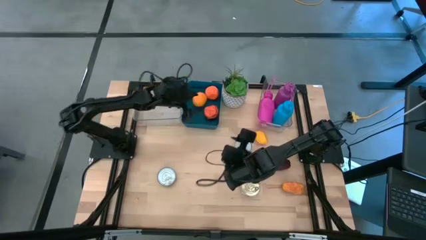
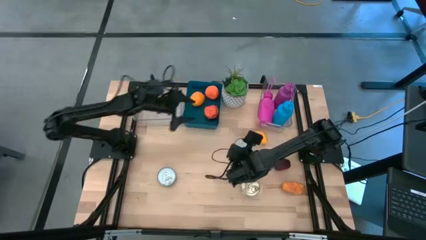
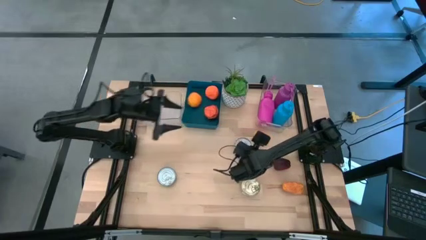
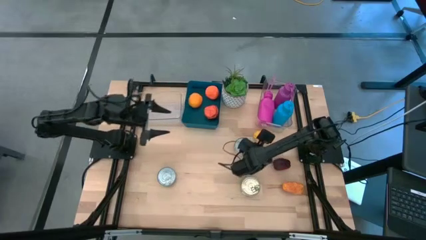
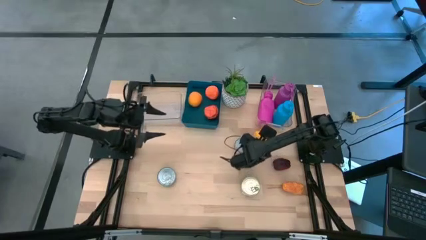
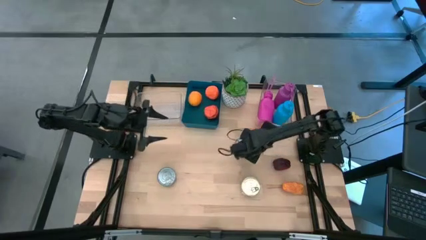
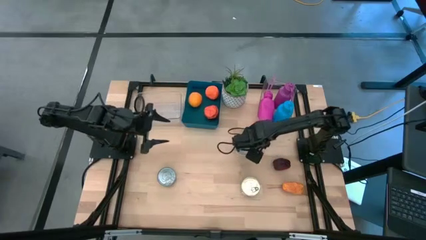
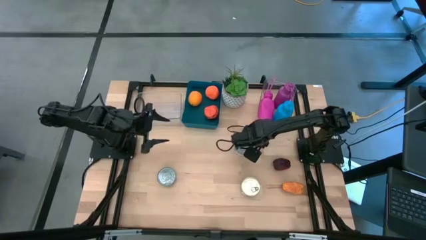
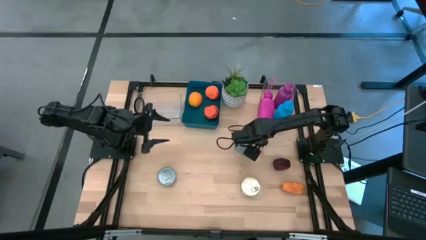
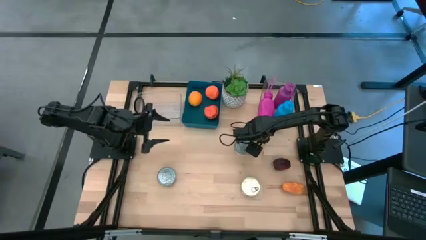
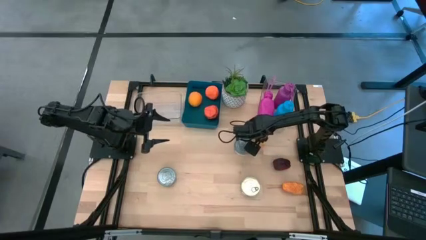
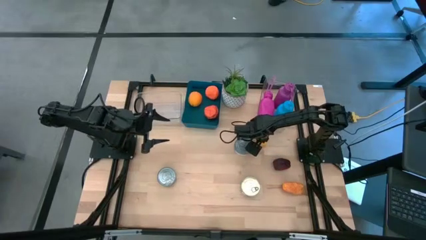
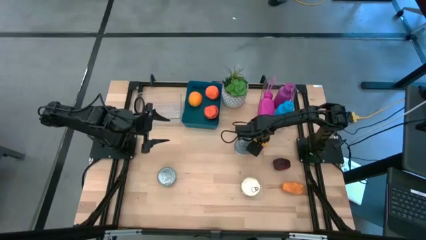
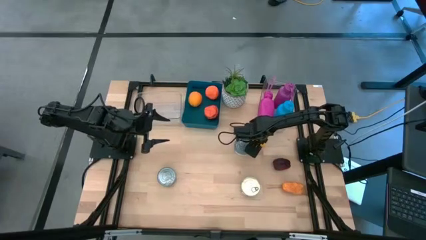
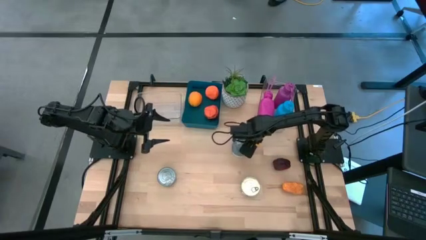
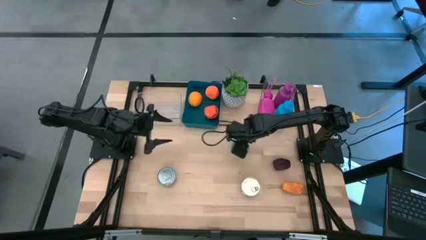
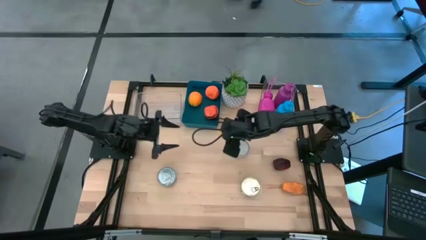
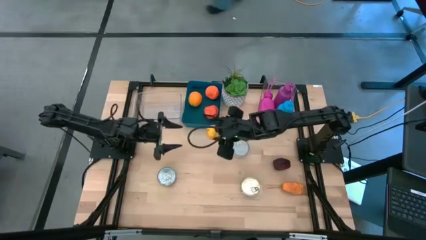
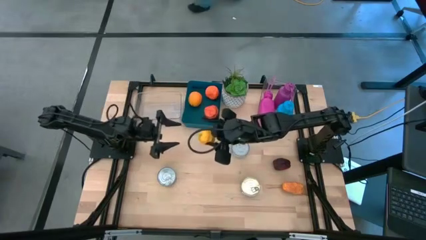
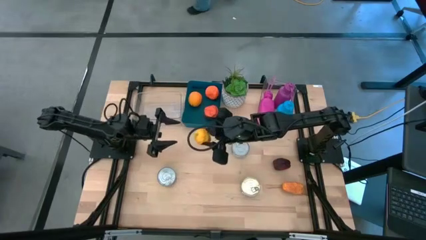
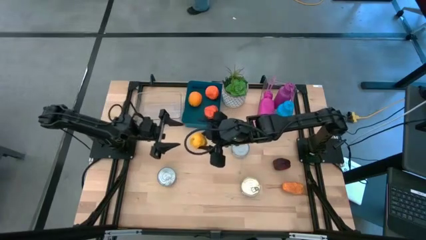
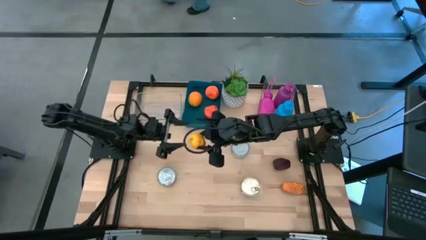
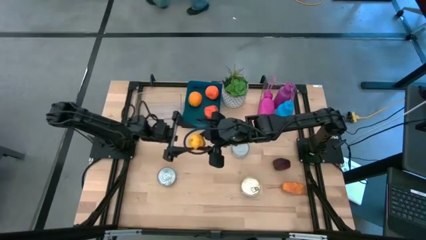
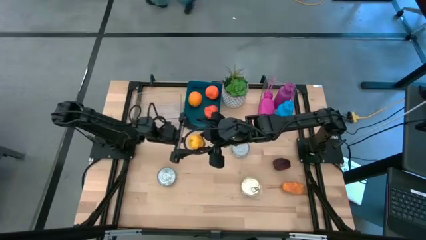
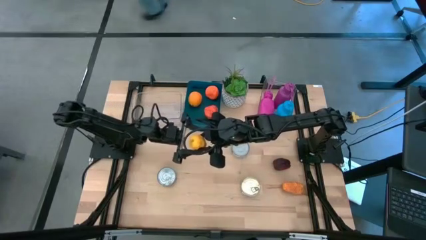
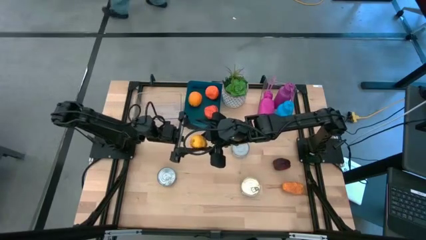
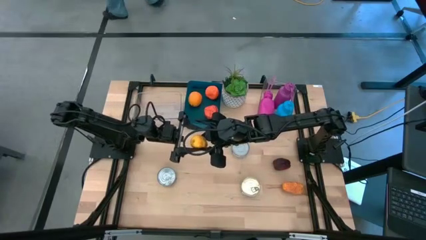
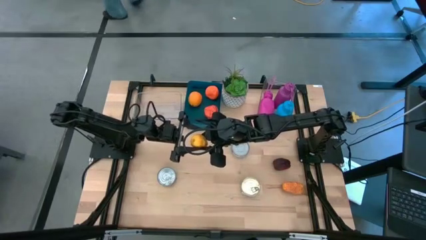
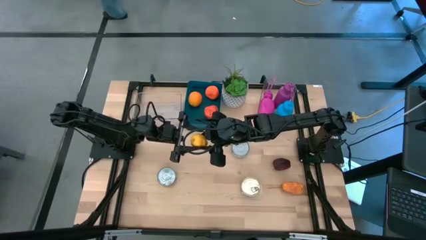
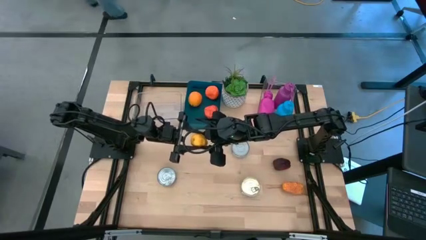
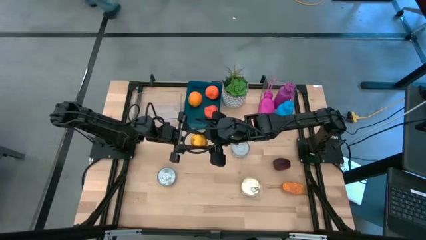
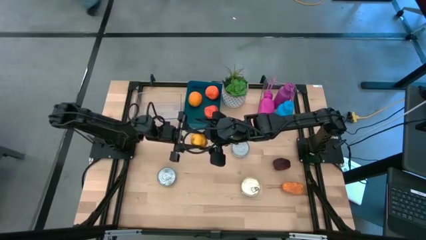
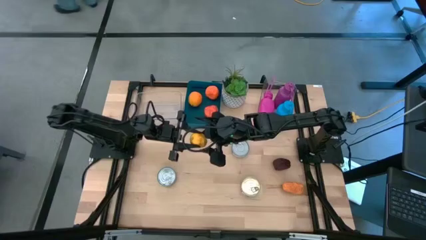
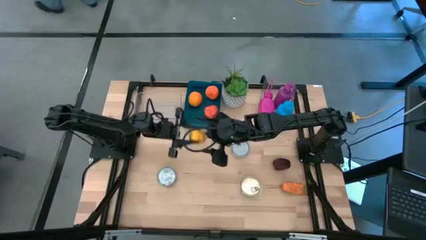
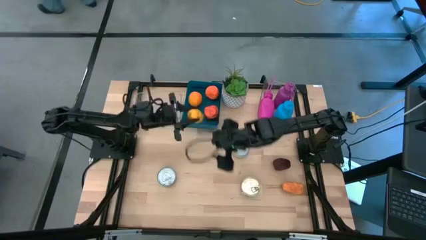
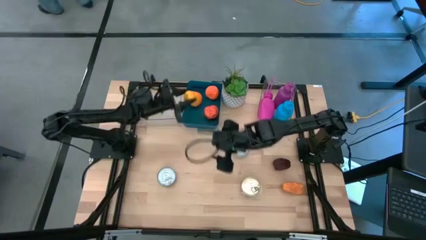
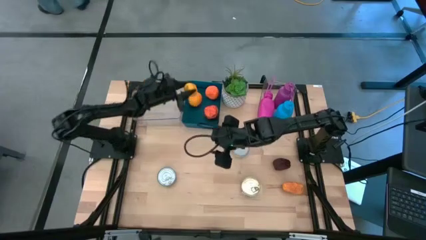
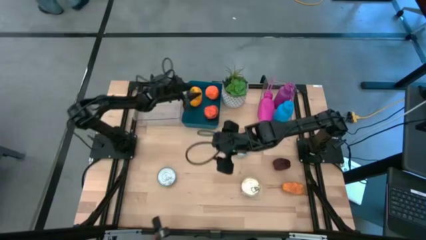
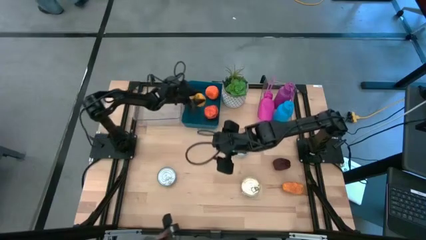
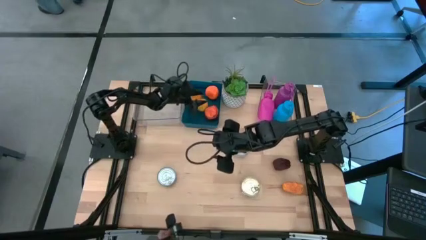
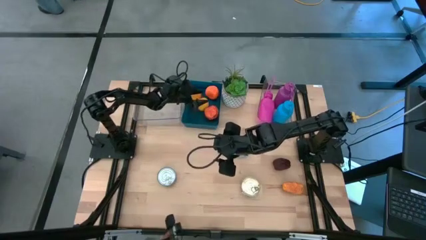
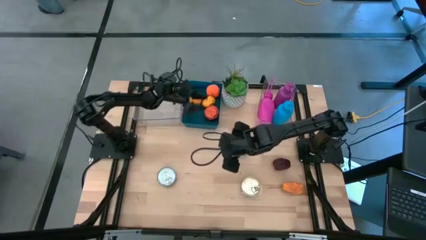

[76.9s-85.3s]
Task: Pick & Place Food Item
Put the lemon into the blue bin

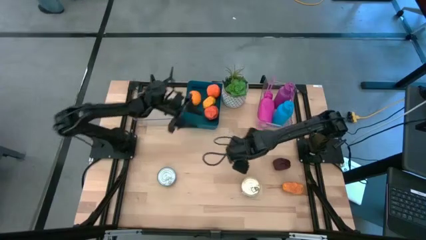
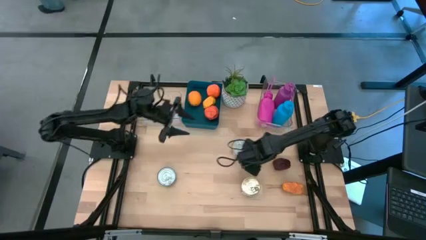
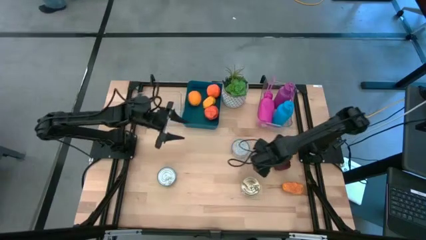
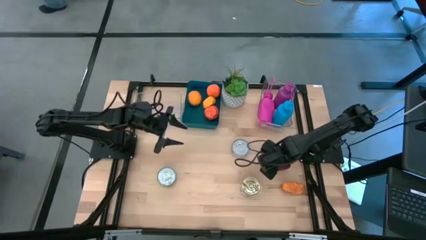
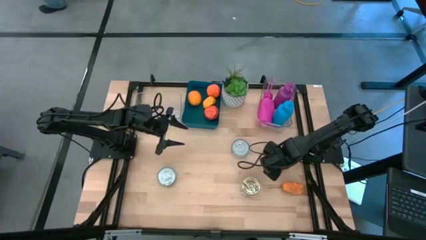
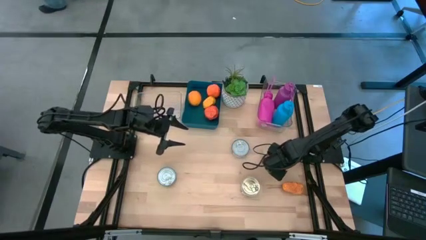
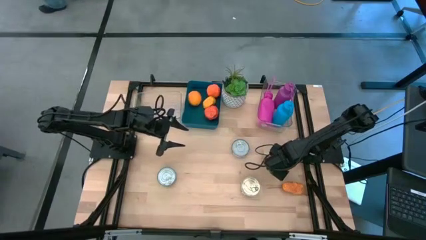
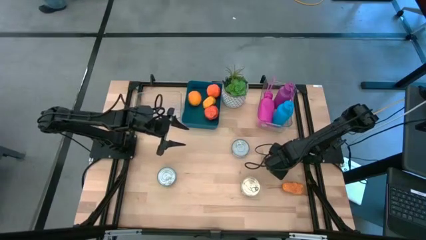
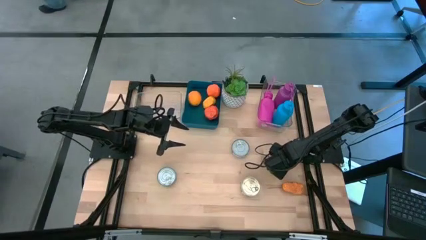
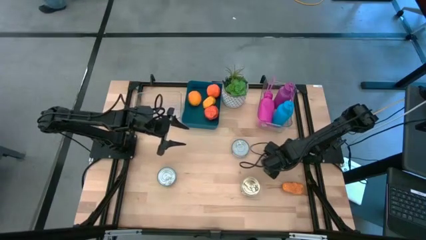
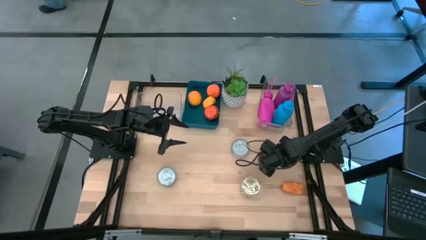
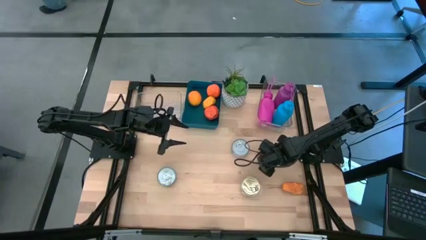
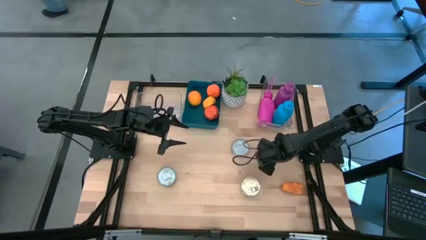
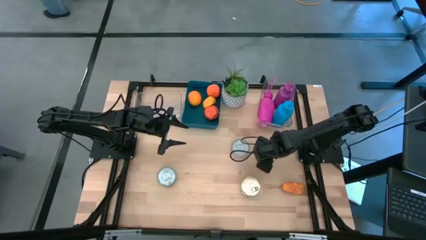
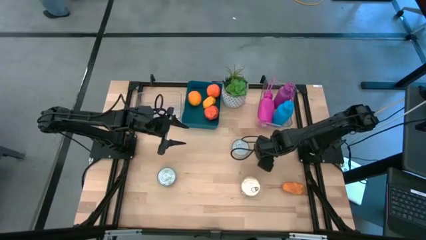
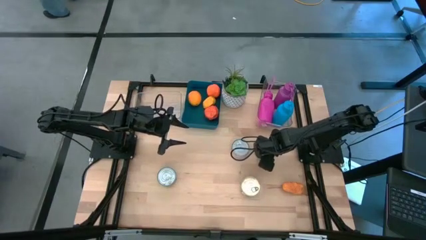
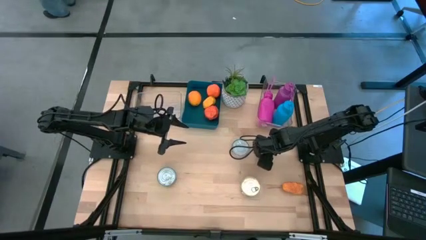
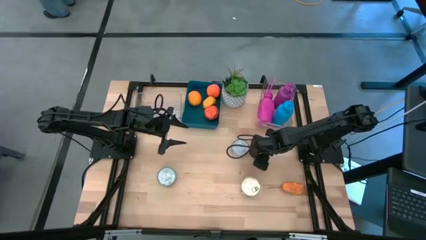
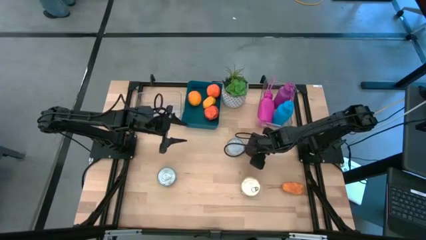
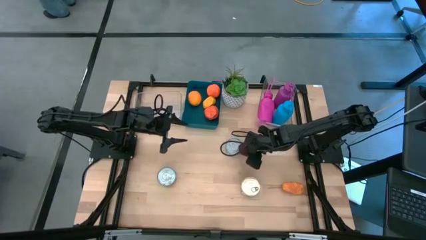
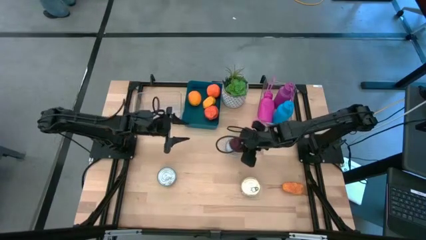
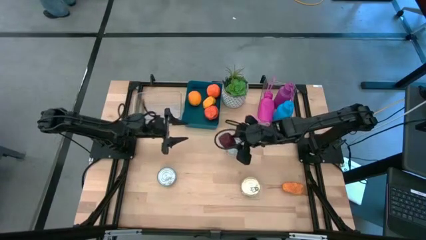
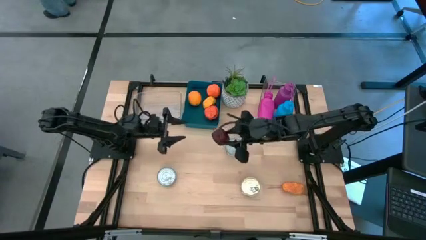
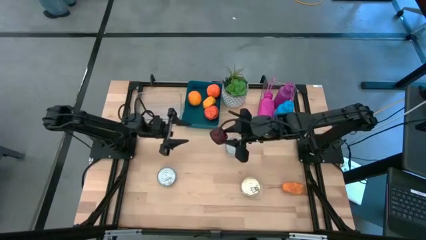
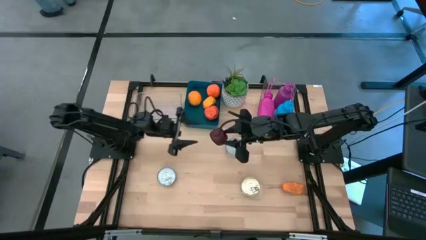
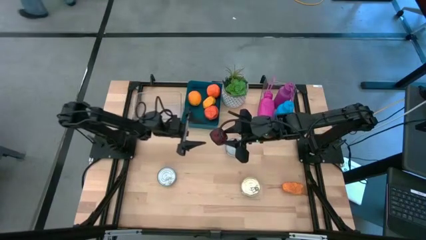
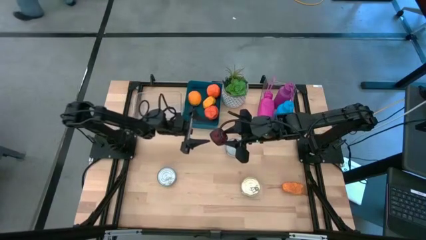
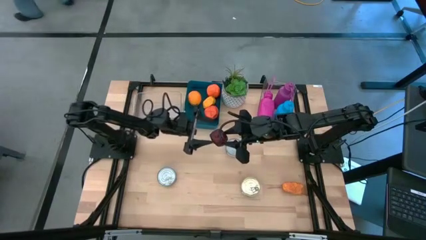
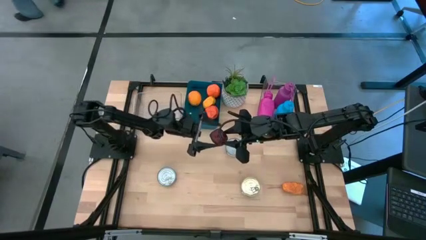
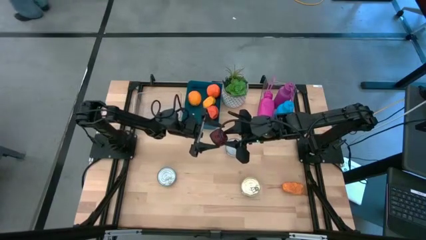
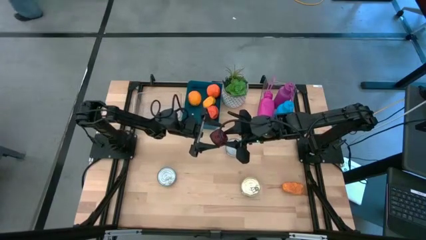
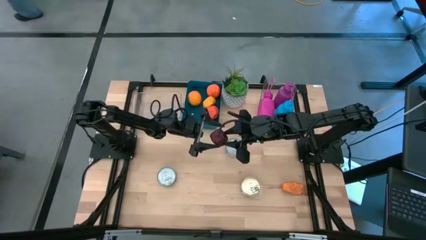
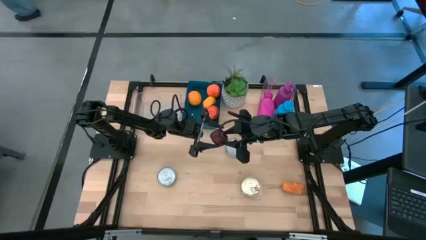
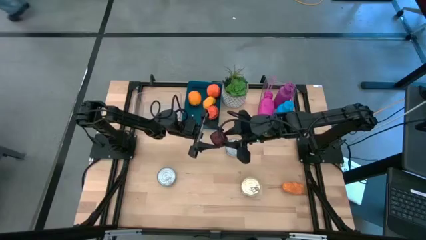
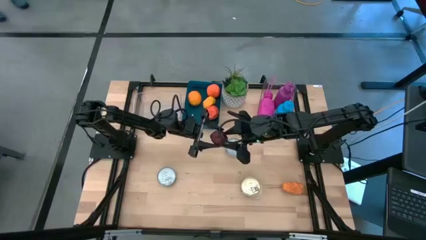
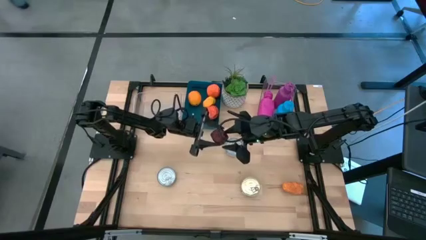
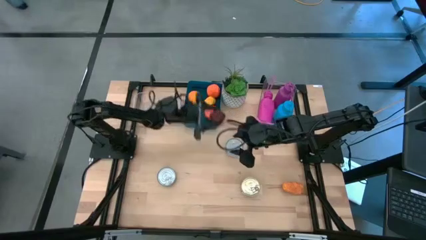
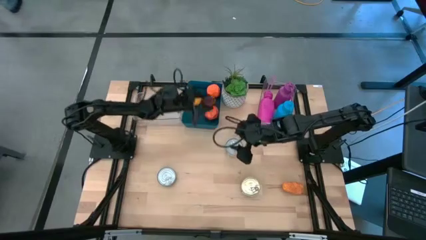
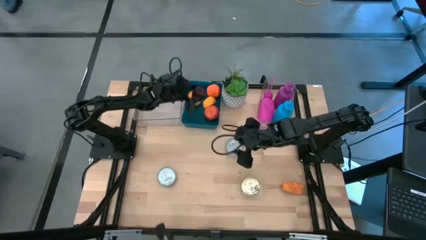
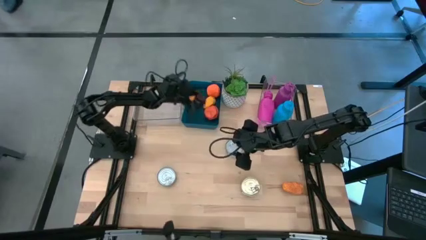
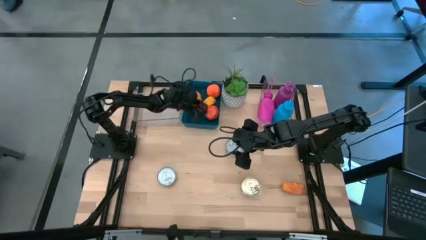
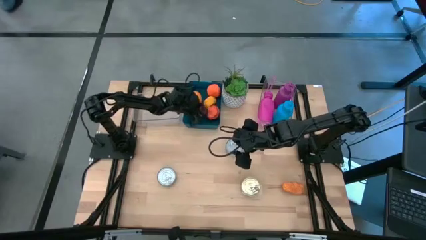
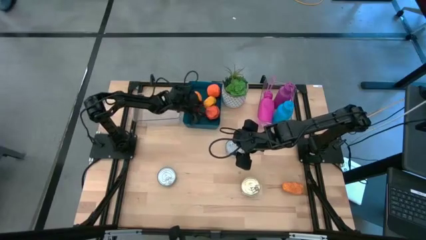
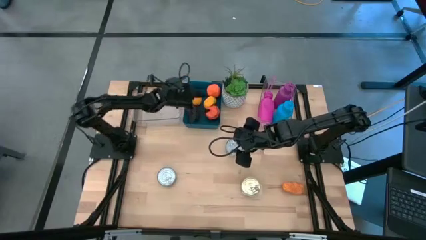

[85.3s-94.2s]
Put the apple into the blue bin
